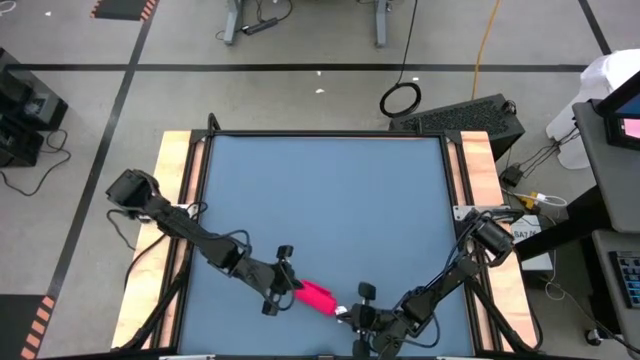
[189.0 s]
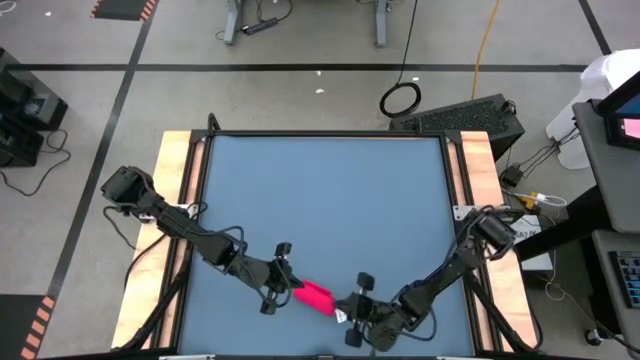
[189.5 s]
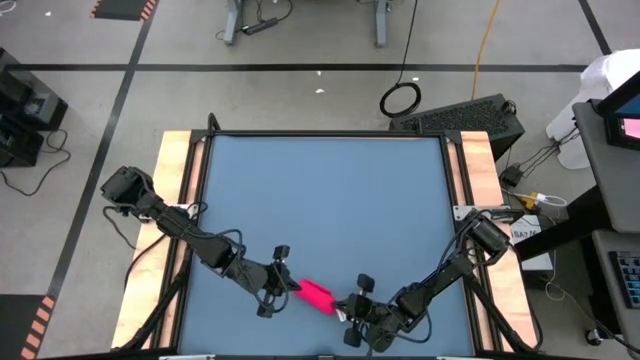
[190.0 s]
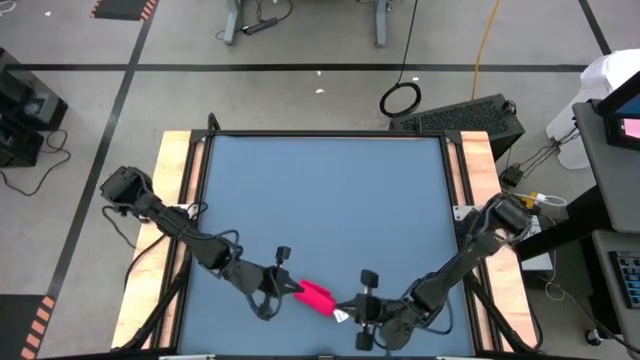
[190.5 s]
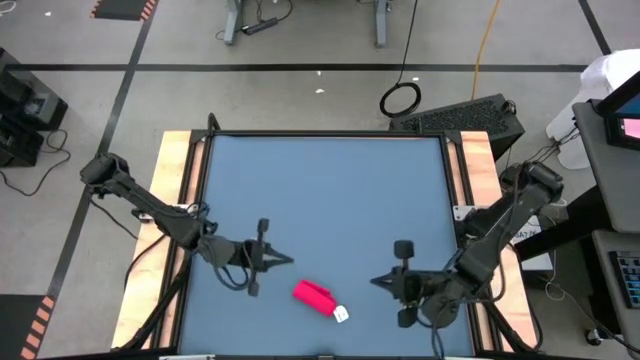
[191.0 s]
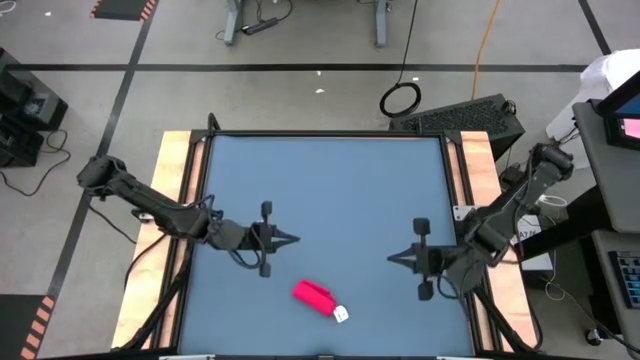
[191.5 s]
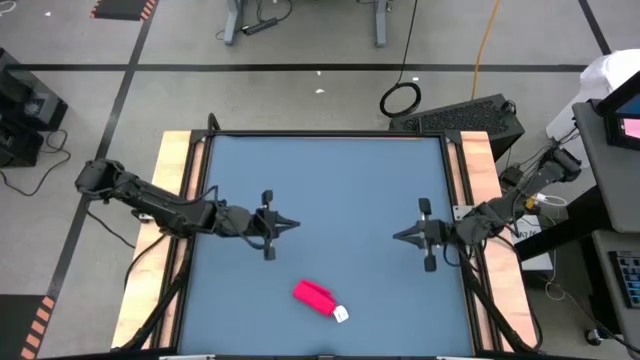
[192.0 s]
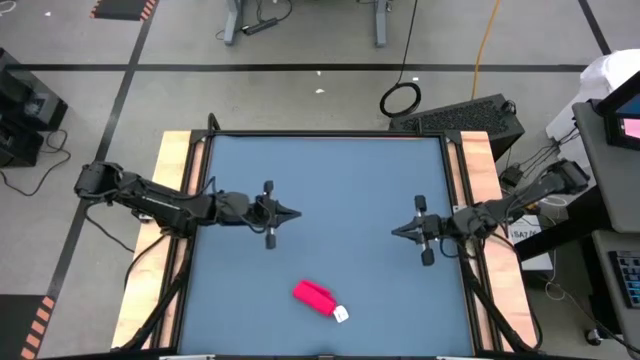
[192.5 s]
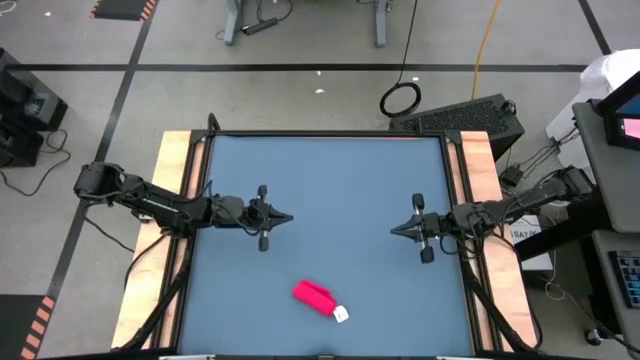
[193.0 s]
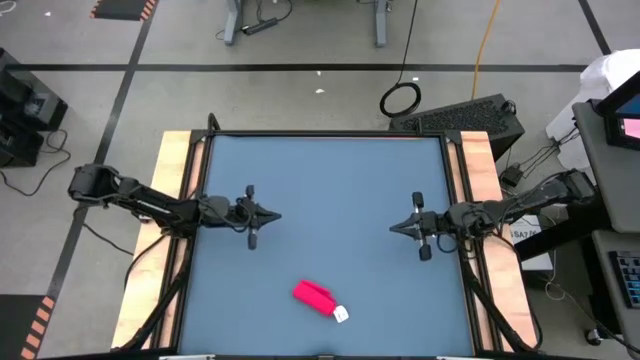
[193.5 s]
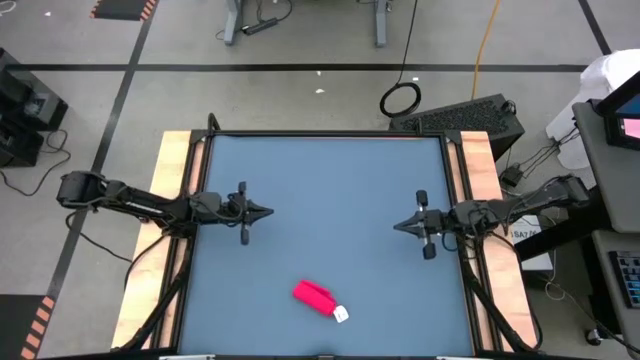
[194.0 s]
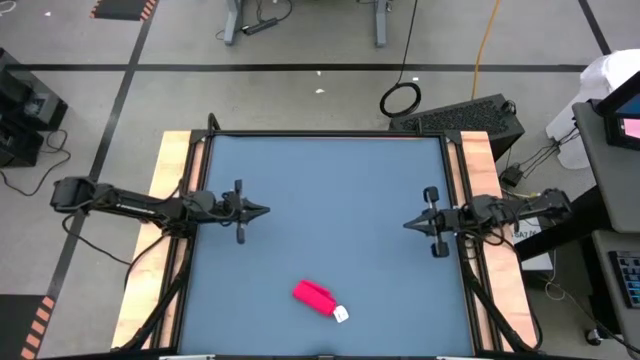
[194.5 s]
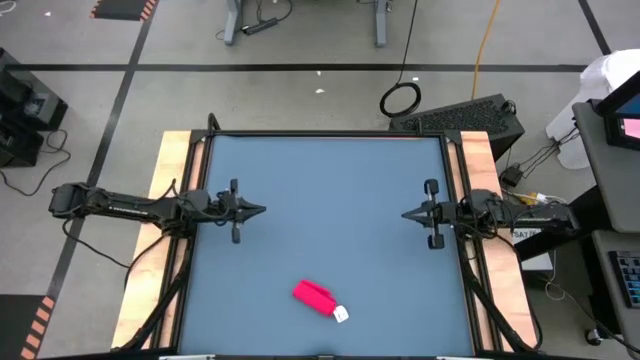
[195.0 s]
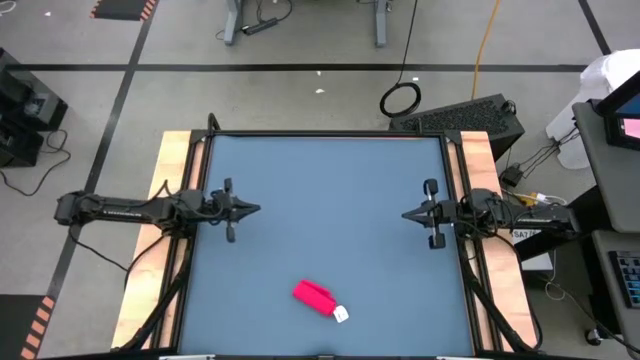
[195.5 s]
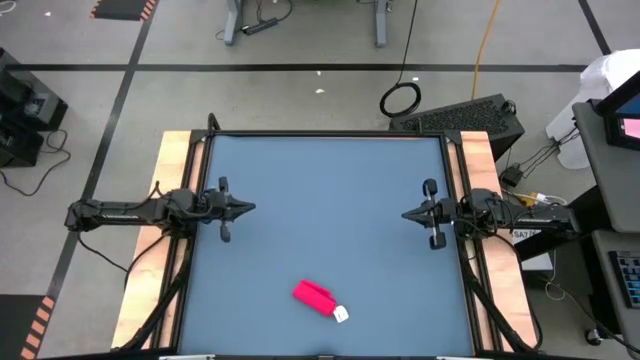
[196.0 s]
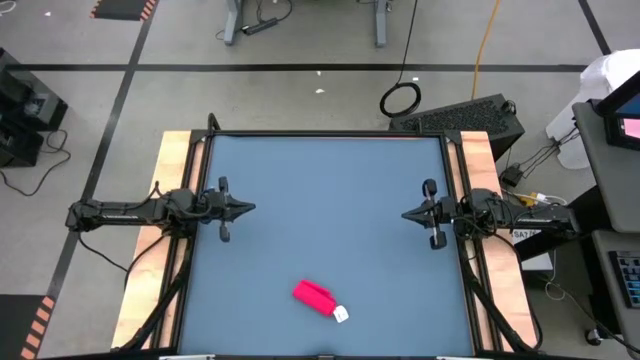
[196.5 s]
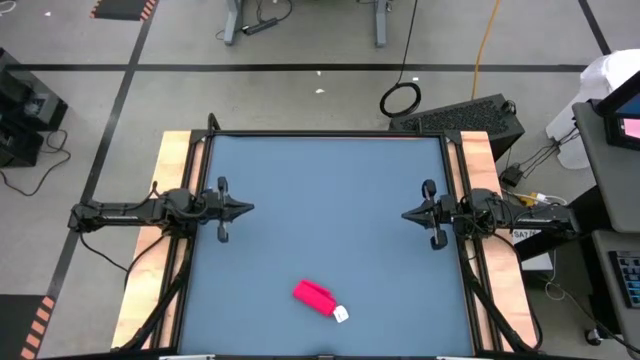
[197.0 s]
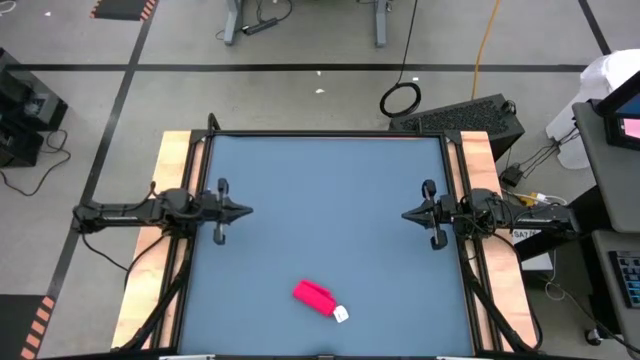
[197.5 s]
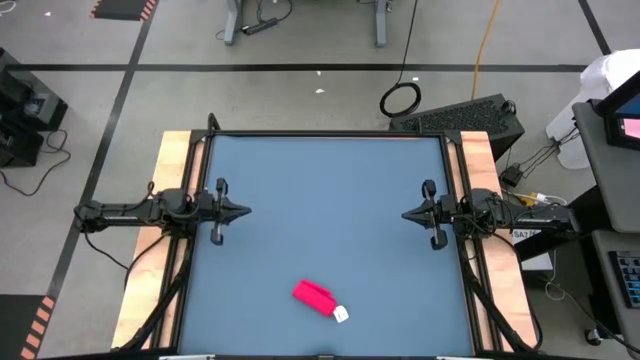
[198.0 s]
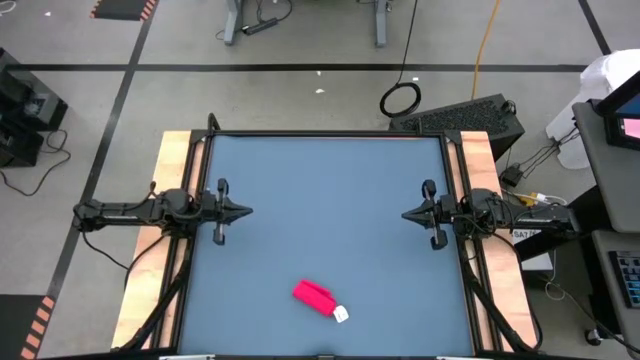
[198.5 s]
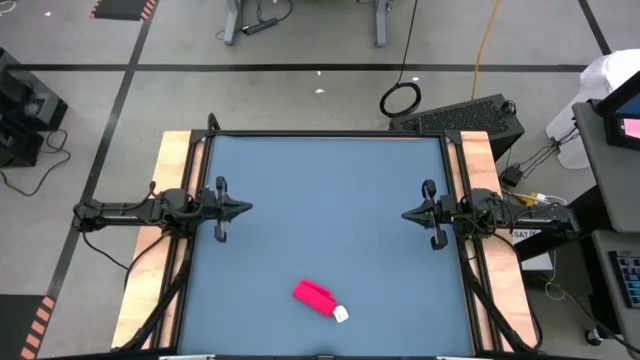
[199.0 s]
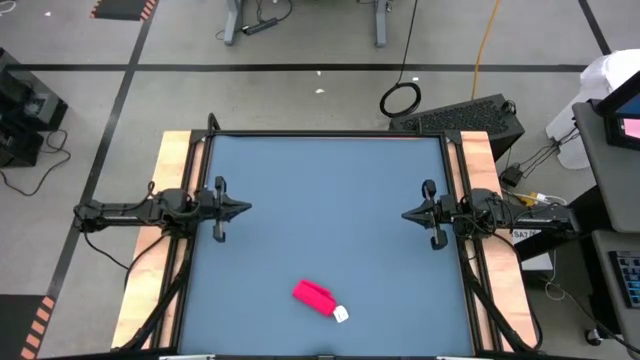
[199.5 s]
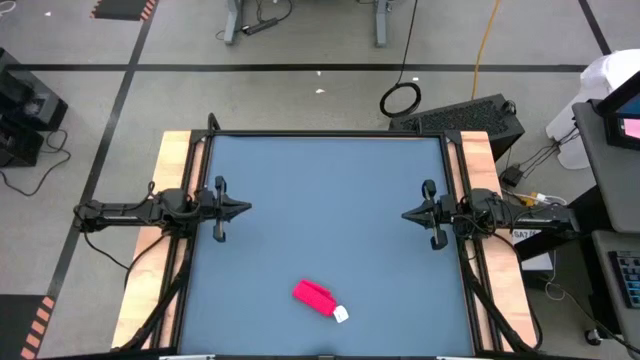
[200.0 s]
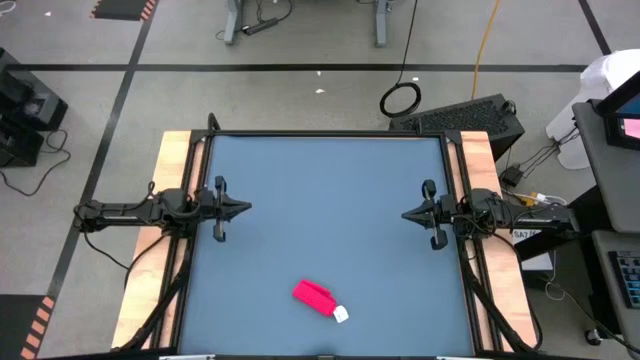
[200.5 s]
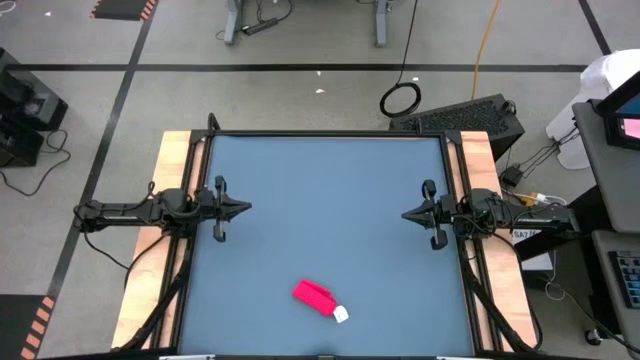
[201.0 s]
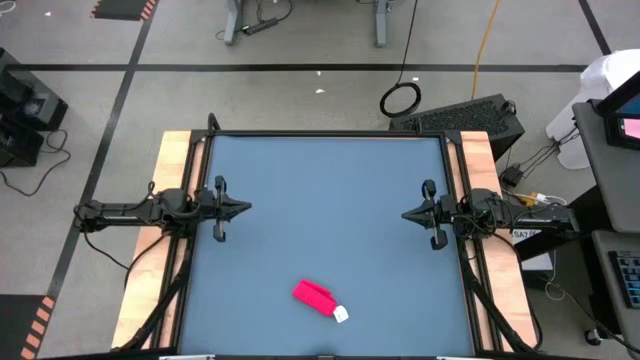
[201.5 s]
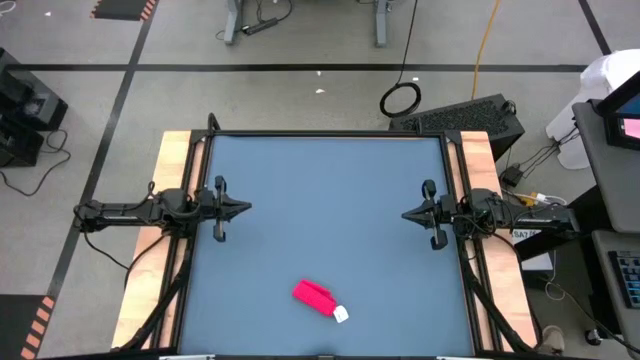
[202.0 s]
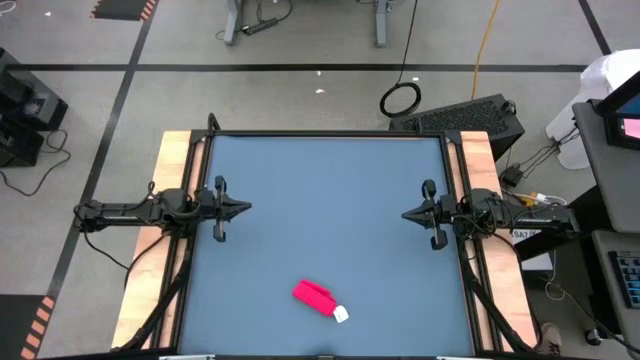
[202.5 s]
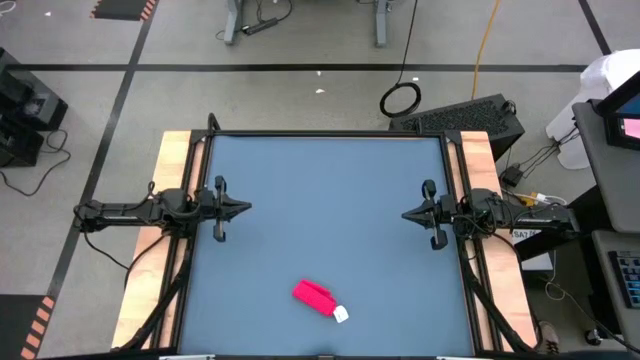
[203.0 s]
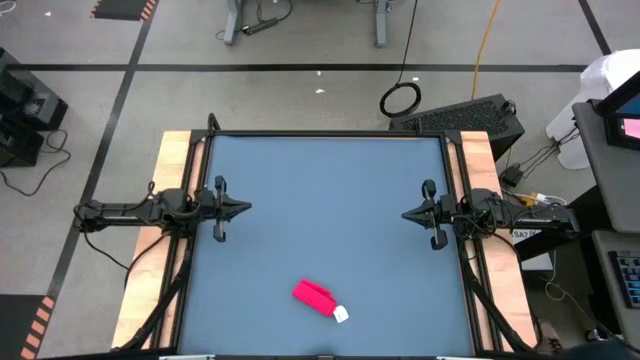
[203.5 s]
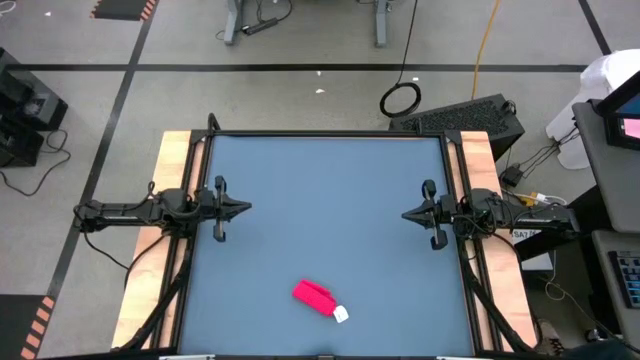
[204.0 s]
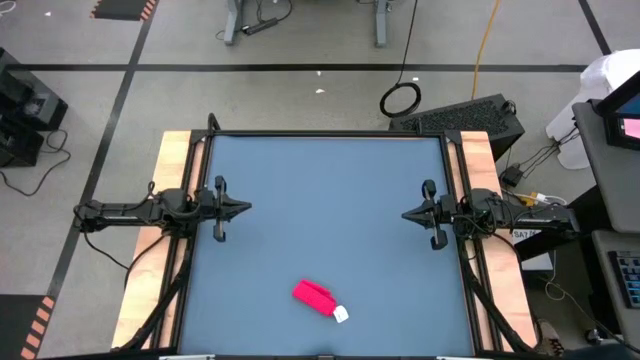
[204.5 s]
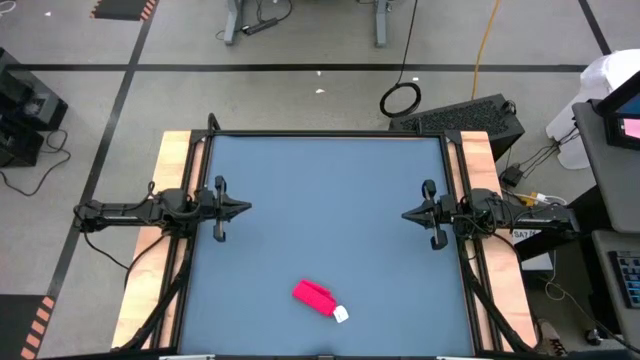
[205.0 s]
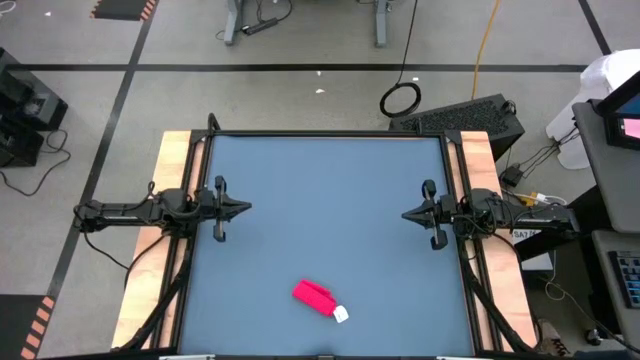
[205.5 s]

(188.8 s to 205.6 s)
Task: Roll towel
Return to Home Position

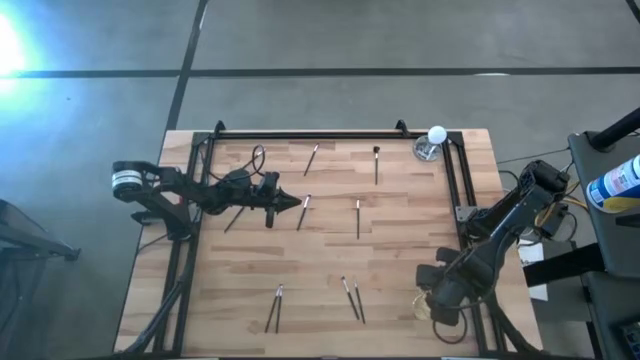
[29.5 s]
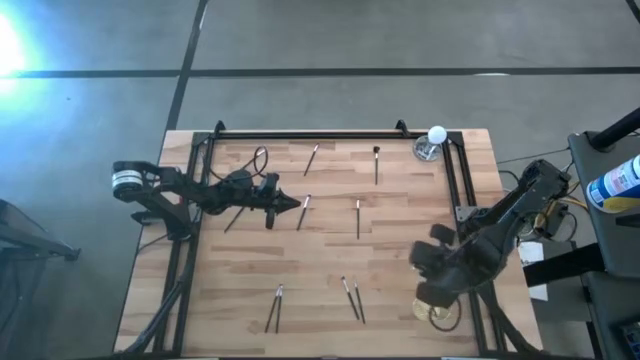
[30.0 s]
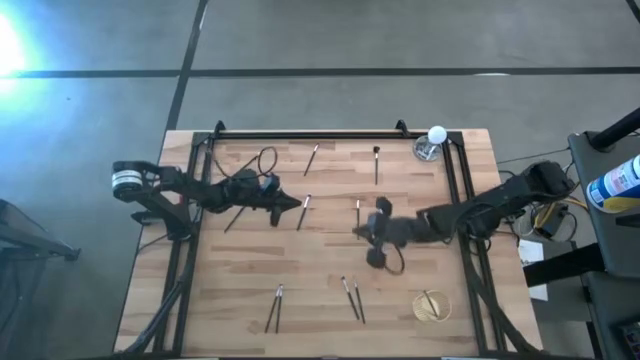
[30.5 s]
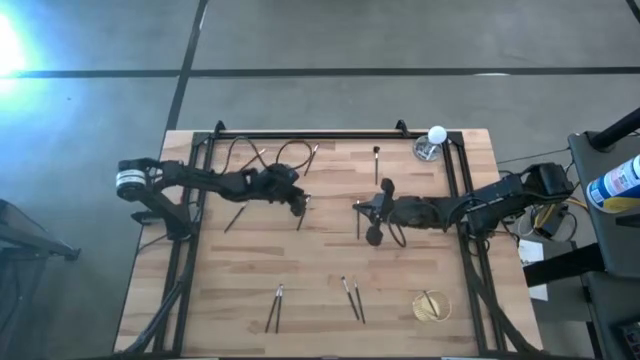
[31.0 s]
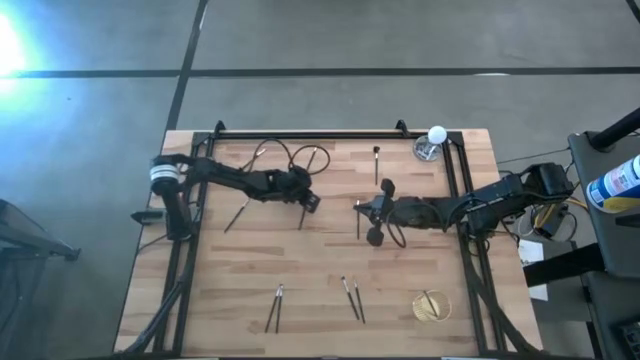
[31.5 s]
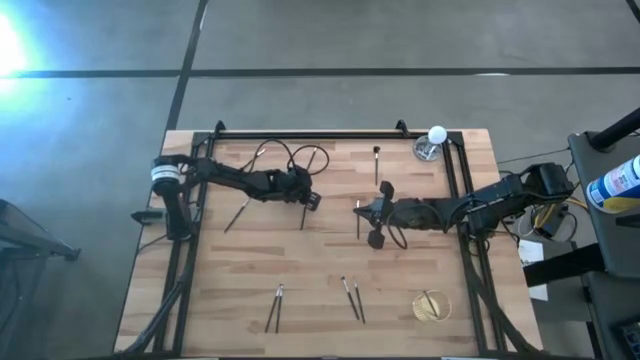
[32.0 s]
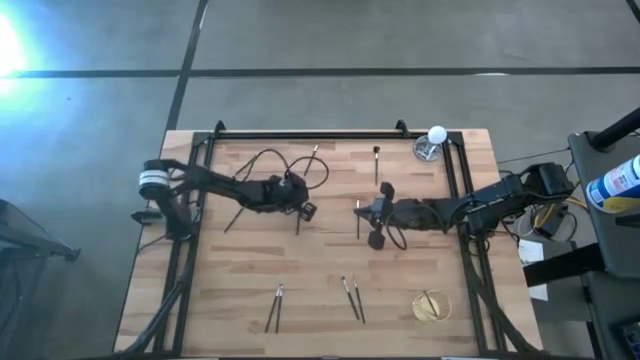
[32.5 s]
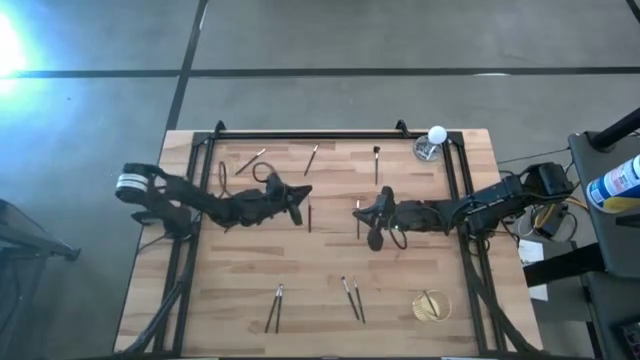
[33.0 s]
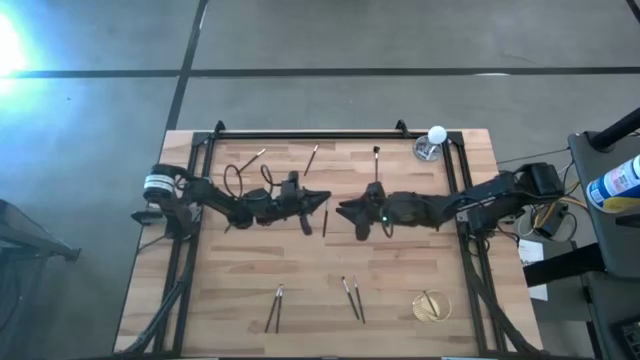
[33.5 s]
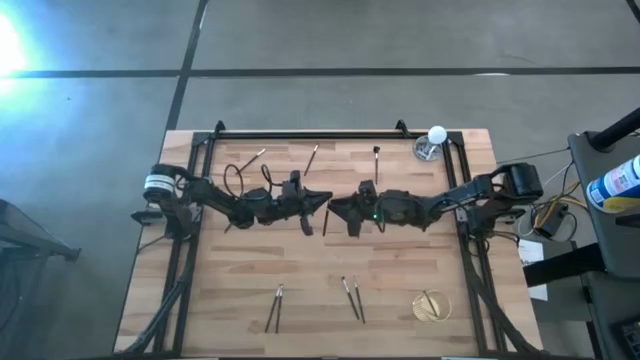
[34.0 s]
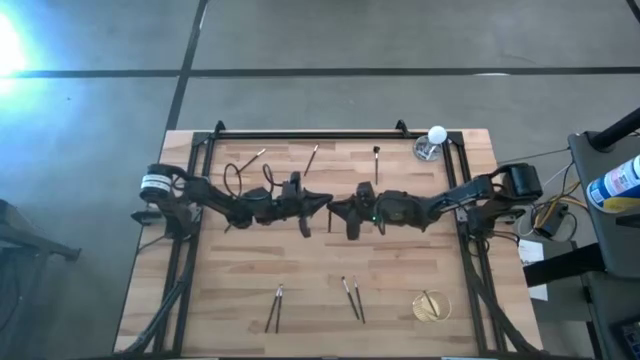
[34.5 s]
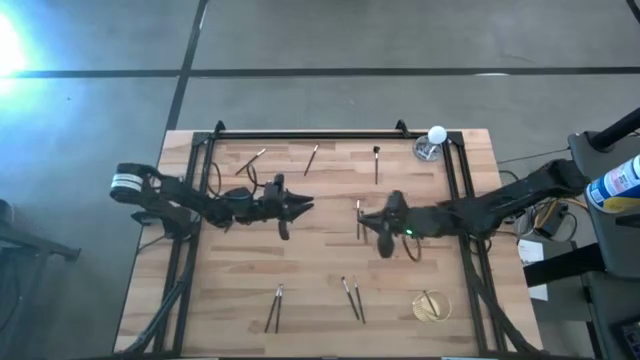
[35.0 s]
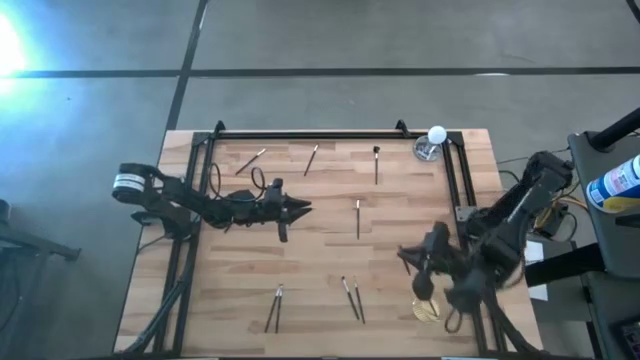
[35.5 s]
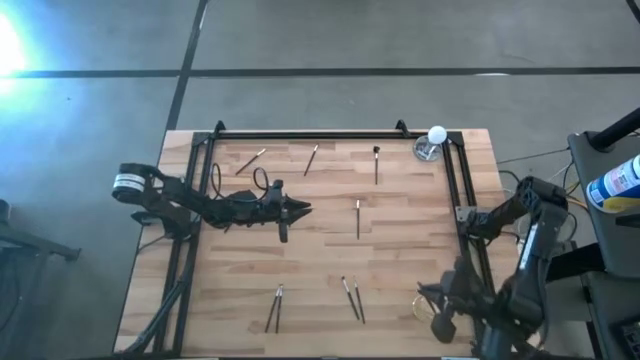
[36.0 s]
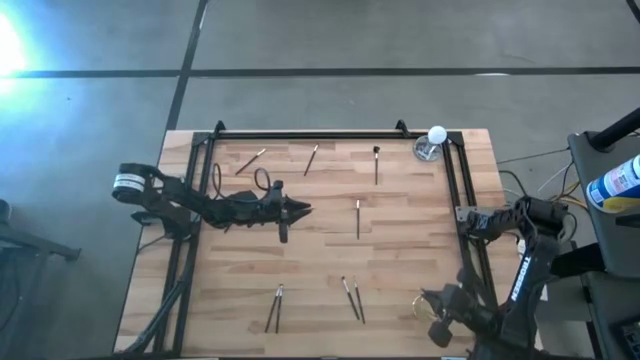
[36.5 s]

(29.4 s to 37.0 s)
Task: Pick & Place Makeup Brushes
Put the eyeshadow brush into the makeup brush holder
